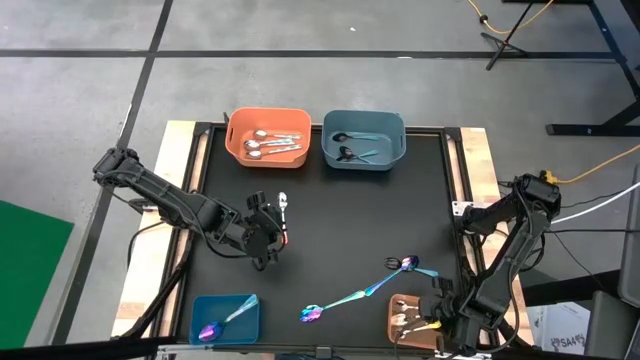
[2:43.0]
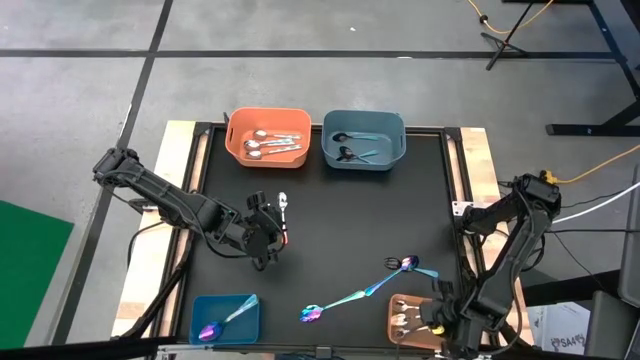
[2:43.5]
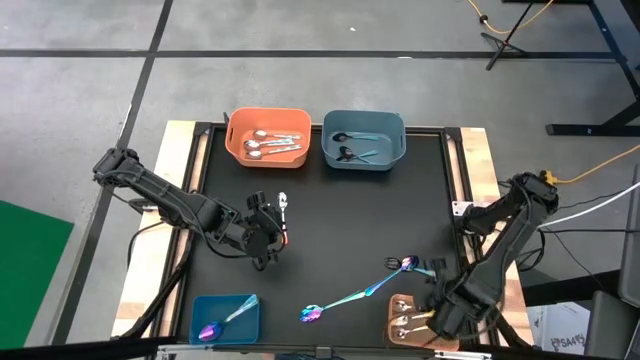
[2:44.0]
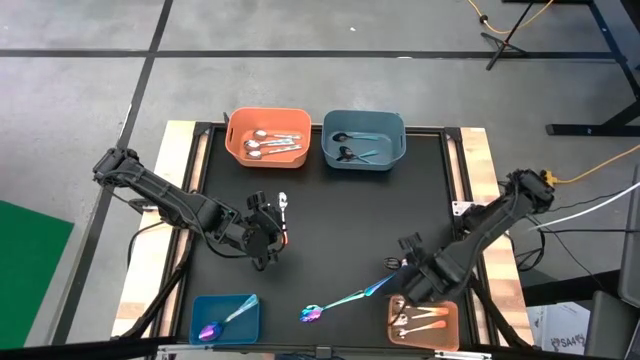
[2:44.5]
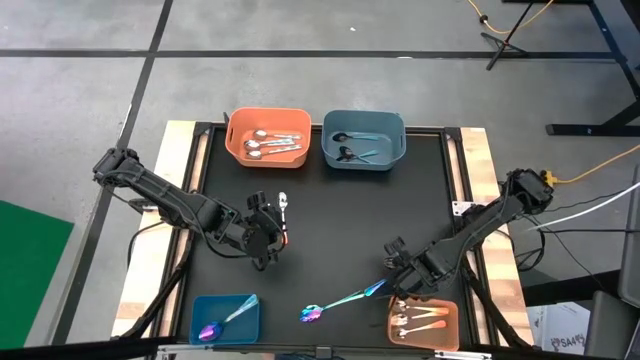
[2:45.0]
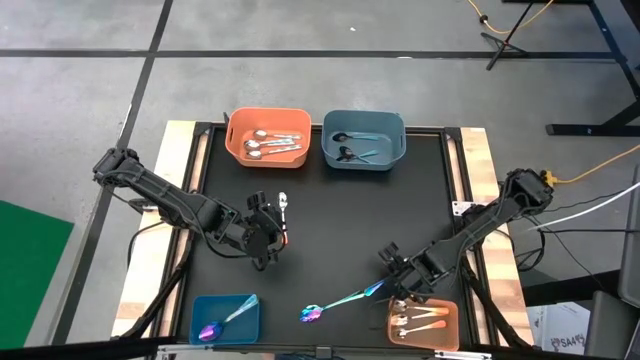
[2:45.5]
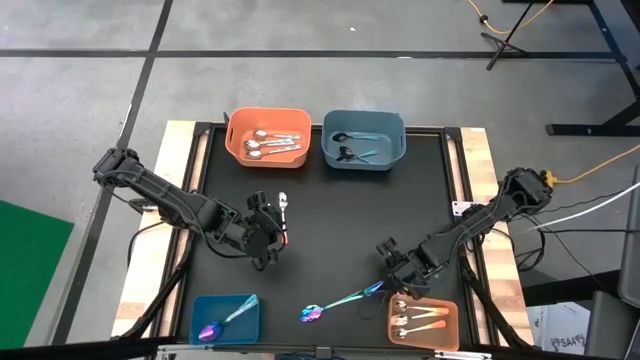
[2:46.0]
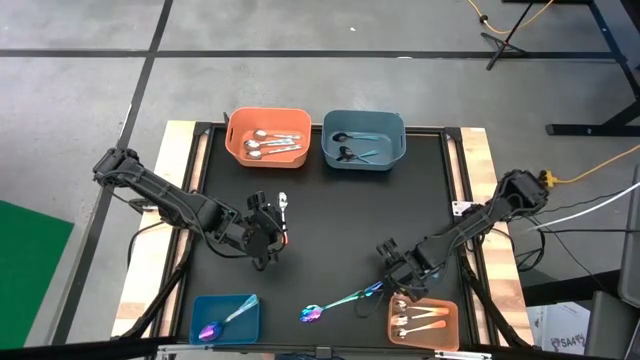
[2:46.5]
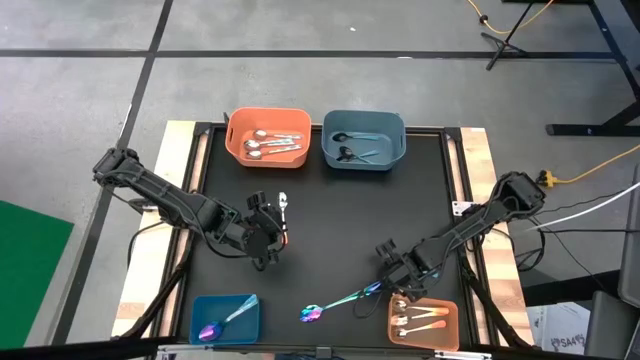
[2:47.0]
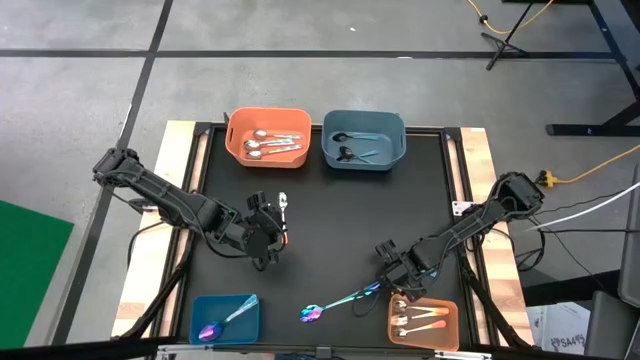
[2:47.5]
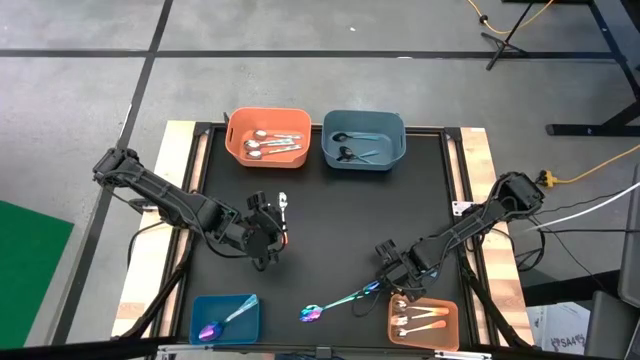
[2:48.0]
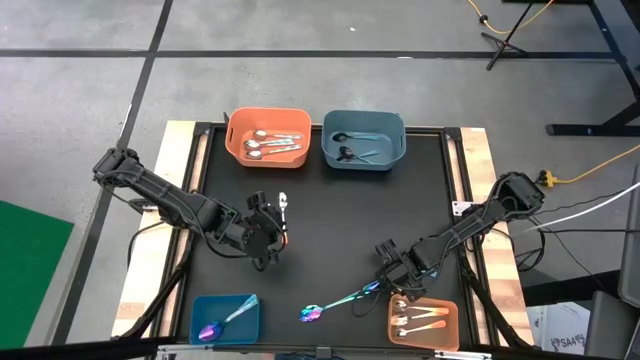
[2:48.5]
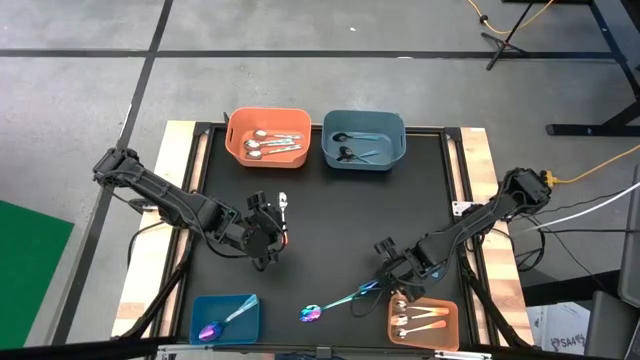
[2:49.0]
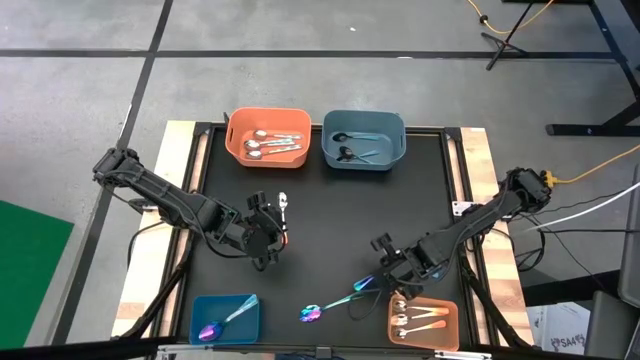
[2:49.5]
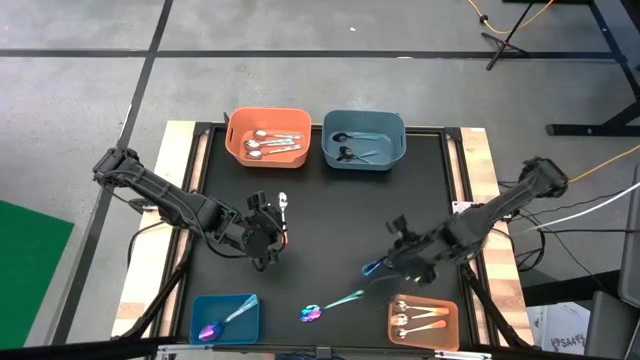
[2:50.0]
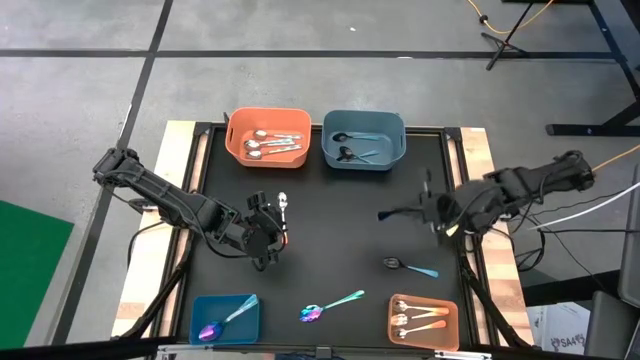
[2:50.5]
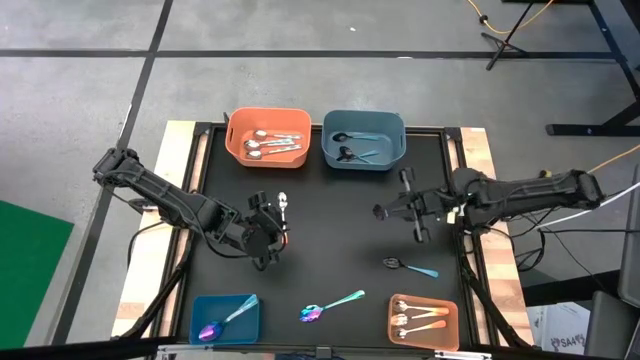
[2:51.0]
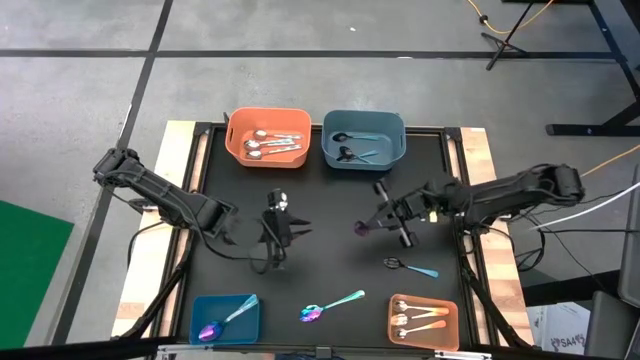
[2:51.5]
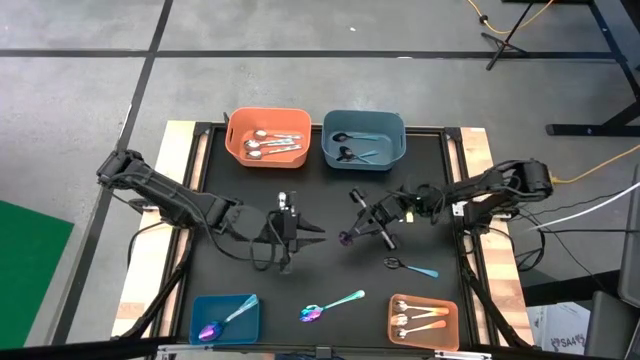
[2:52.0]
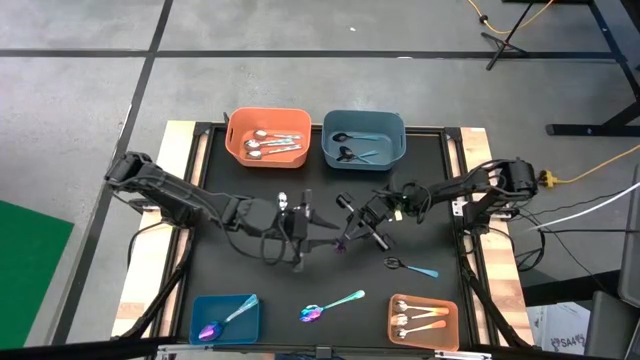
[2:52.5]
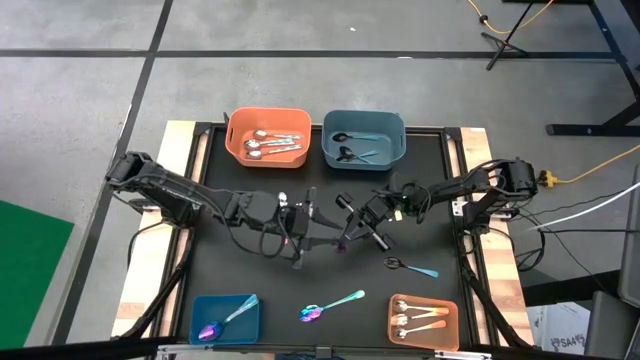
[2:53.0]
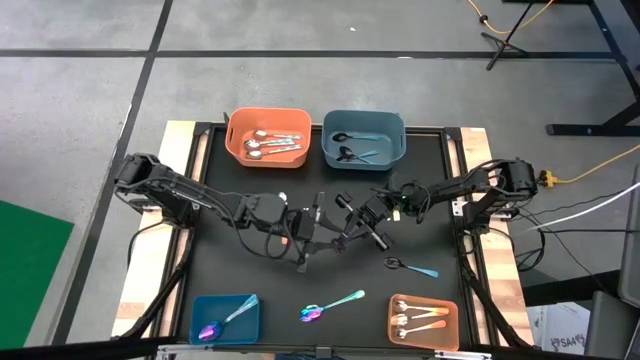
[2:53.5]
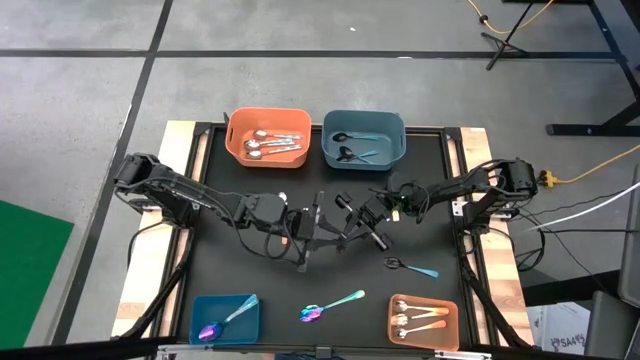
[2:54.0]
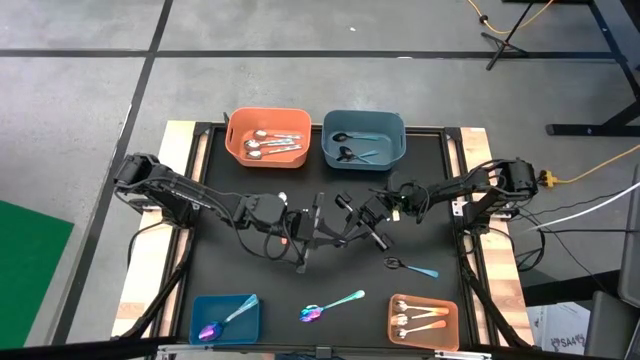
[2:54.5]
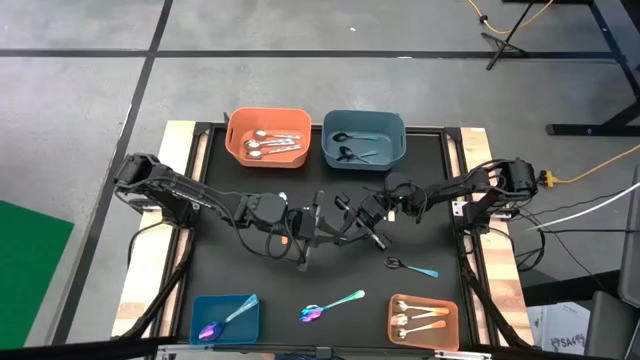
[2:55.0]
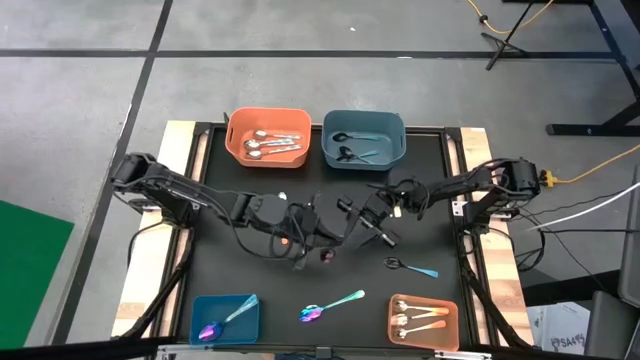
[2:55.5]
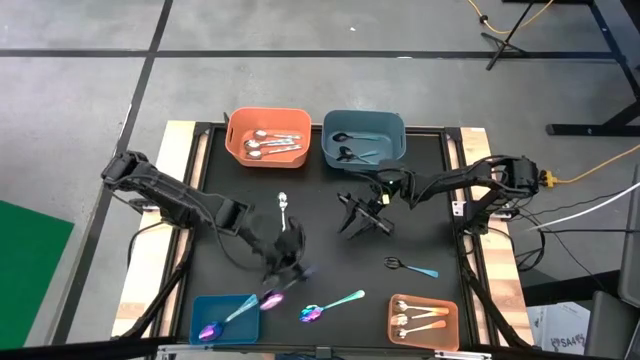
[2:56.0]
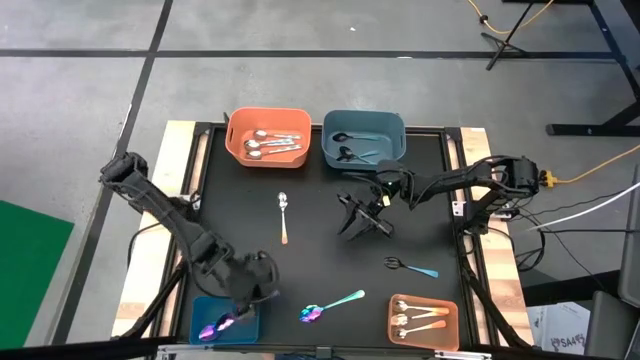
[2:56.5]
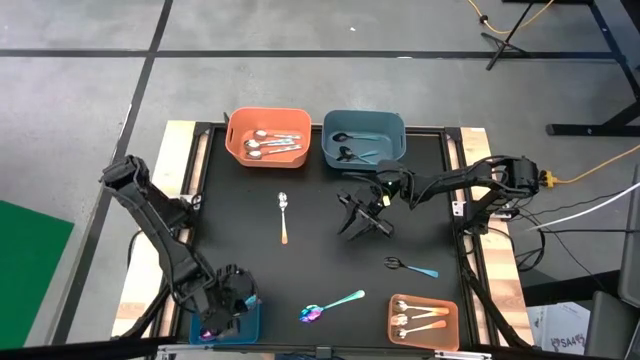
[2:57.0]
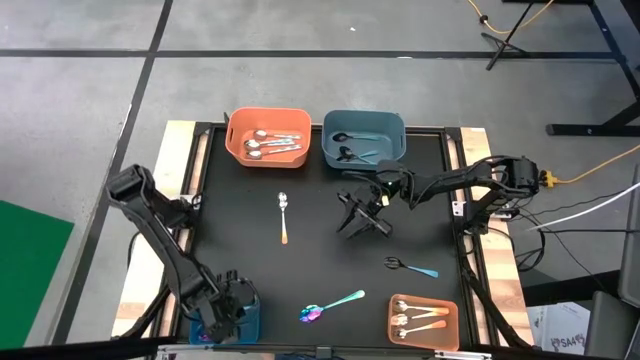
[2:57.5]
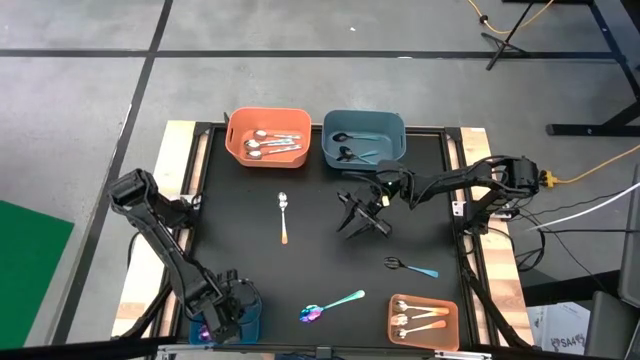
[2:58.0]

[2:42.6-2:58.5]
Task: Sort silverware by color (type)
Put the purple spoon into the bottom blue bin

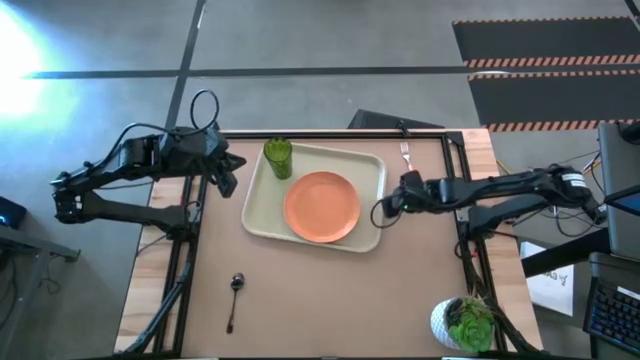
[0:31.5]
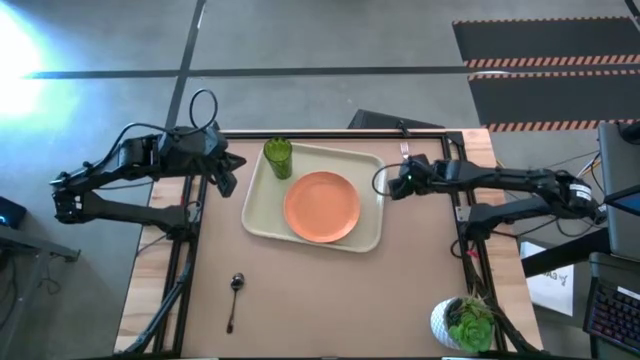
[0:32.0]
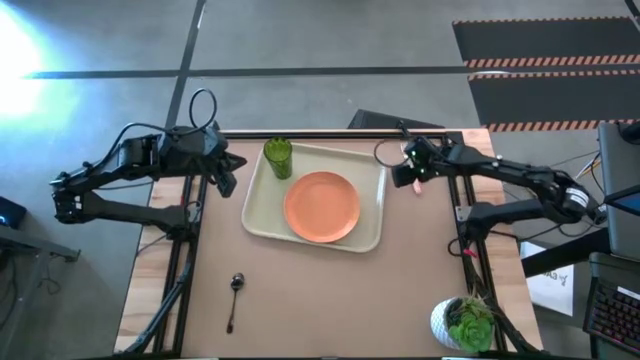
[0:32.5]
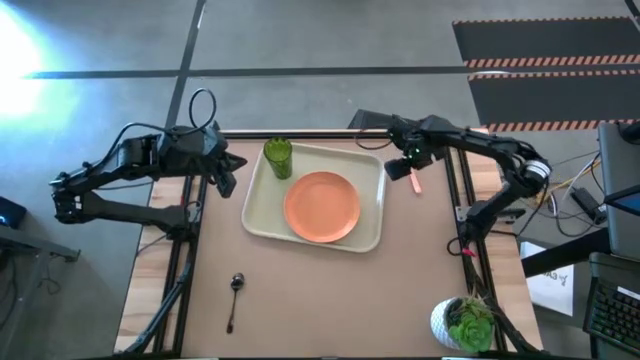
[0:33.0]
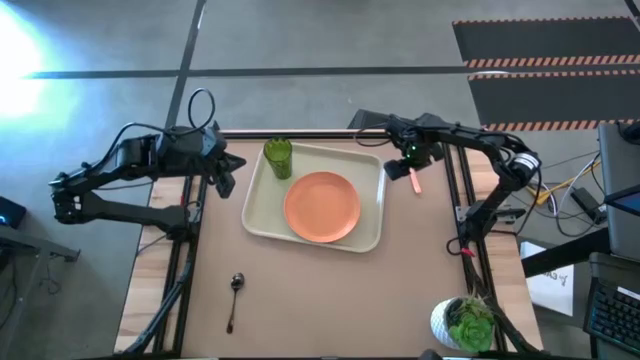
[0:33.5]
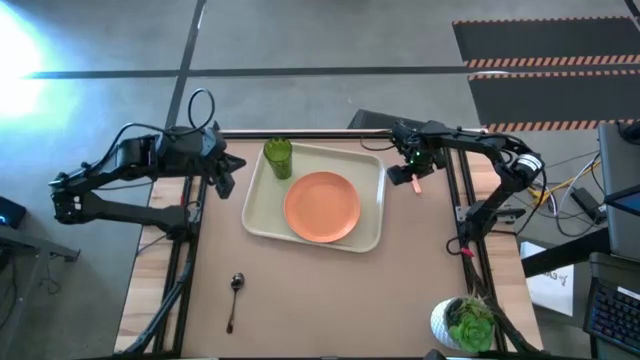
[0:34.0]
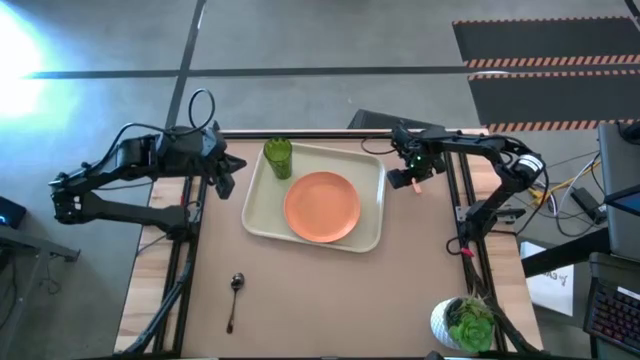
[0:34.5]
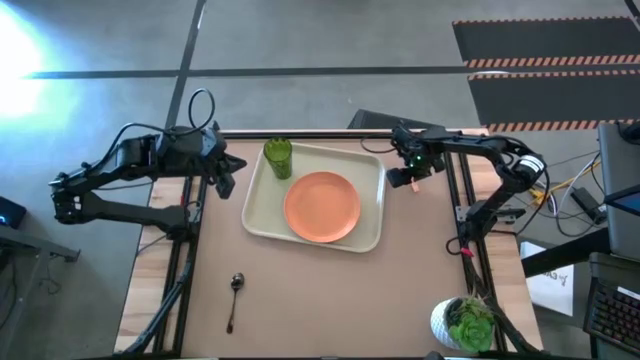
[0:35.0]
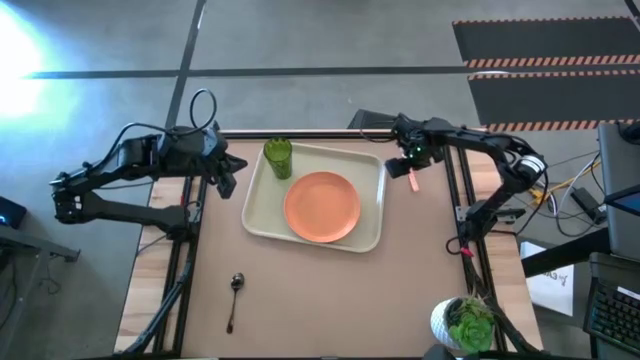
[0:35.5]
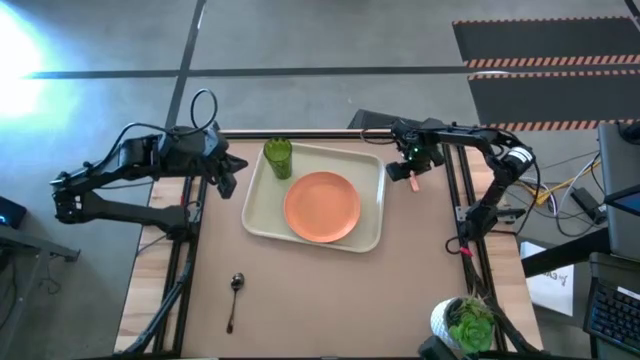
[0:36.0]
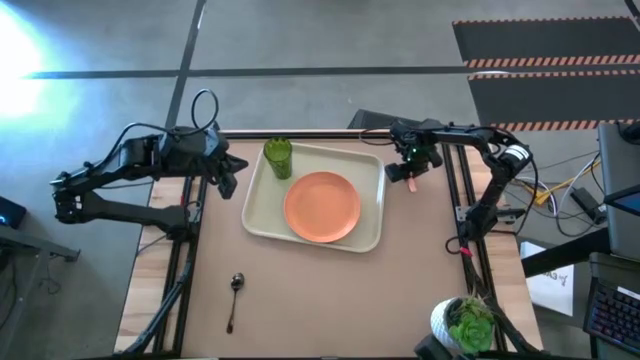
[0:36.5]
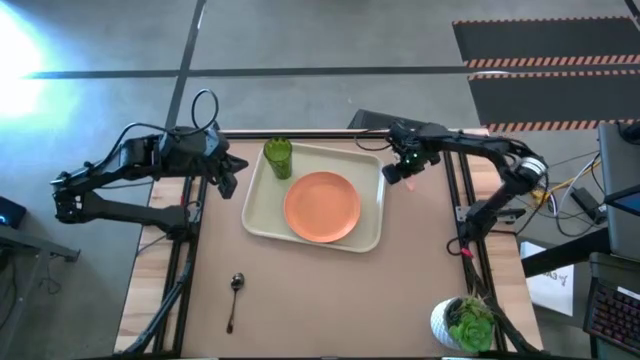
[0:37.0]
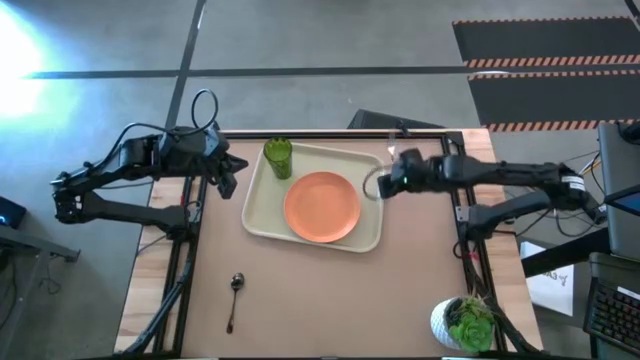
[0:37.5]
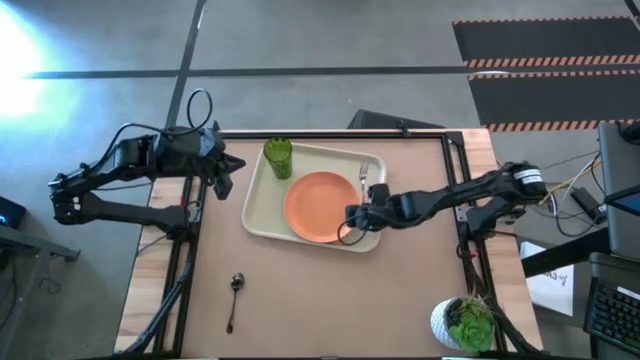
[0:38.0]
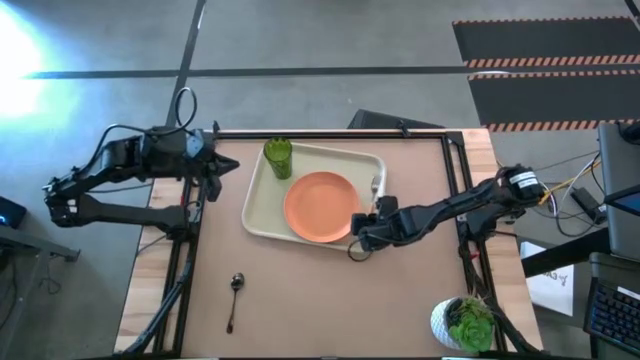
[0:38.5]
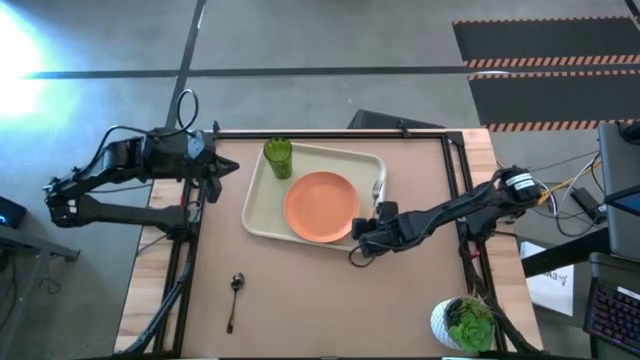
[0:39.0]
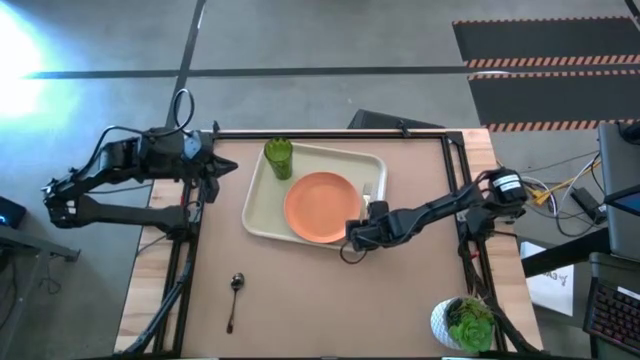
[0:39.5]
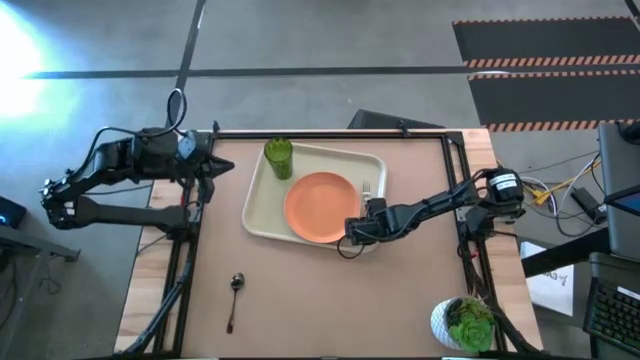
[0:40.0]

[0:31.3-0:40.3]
Task: Pick and place plate/cup/fork/spoon on tray
Put the orange fork on the light brown serving tray to the right of the orange plate
